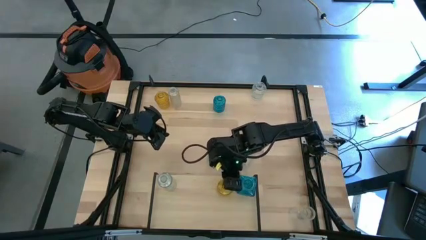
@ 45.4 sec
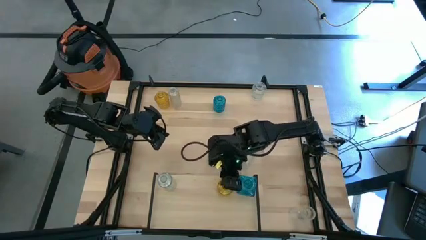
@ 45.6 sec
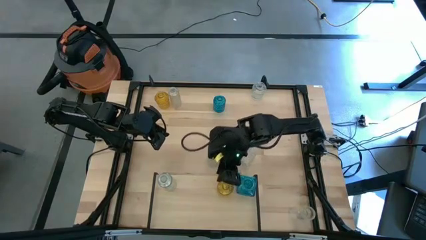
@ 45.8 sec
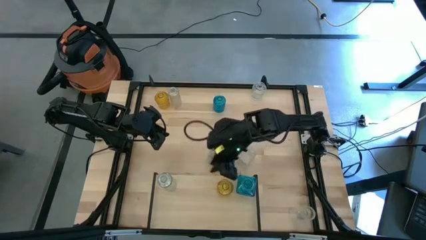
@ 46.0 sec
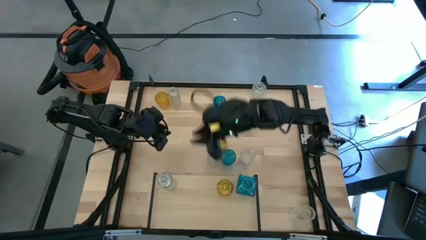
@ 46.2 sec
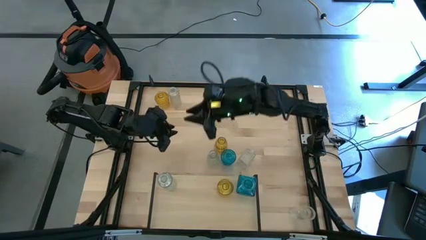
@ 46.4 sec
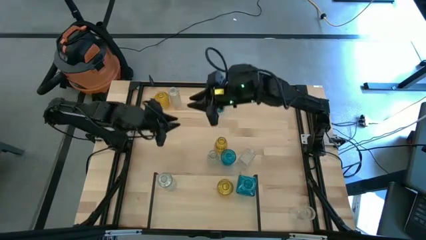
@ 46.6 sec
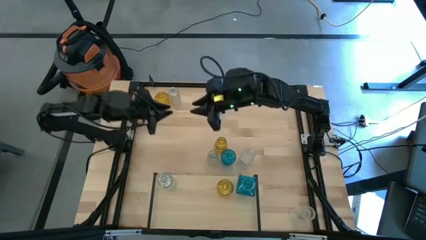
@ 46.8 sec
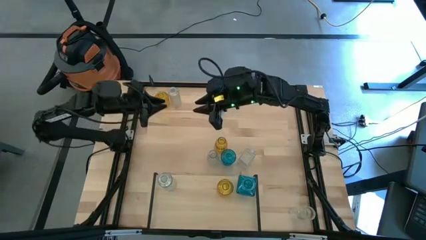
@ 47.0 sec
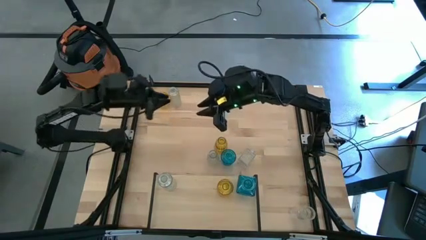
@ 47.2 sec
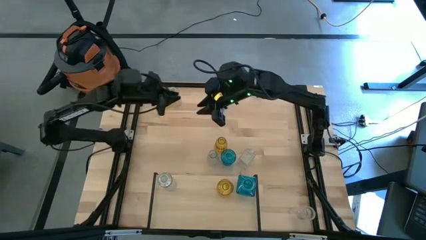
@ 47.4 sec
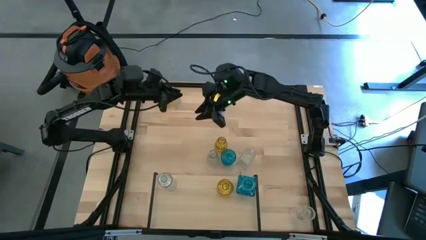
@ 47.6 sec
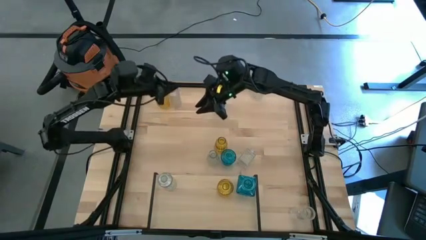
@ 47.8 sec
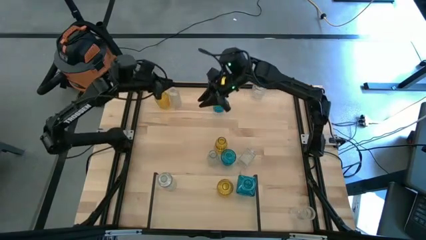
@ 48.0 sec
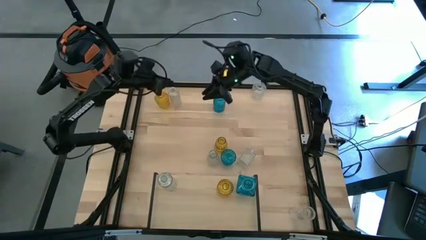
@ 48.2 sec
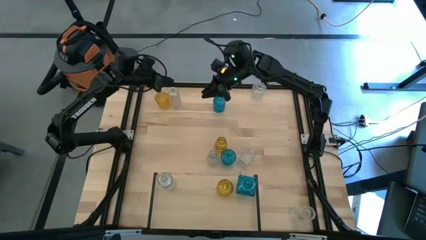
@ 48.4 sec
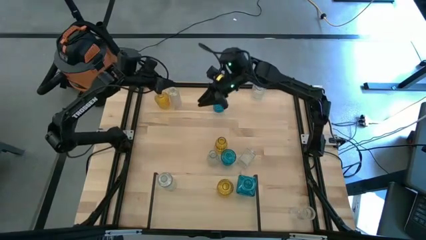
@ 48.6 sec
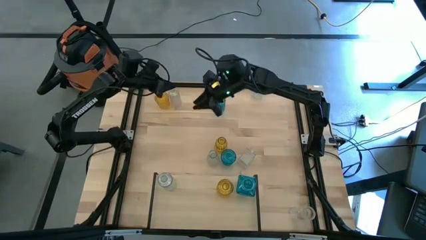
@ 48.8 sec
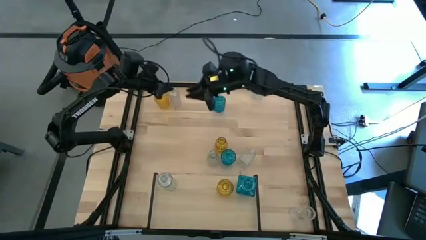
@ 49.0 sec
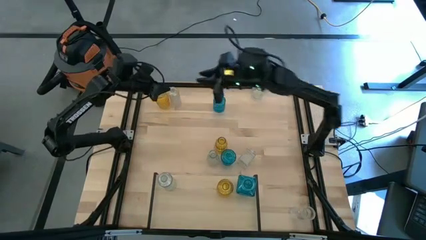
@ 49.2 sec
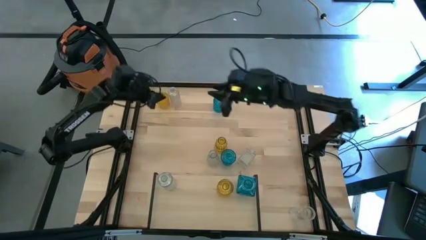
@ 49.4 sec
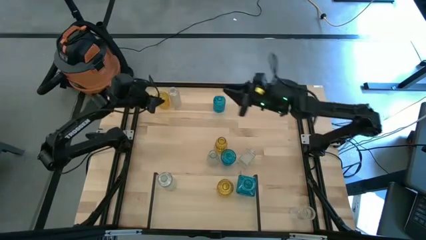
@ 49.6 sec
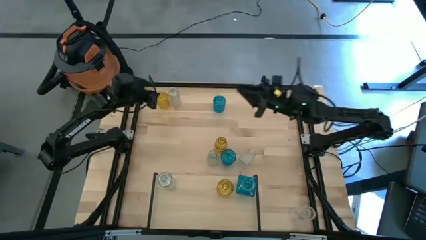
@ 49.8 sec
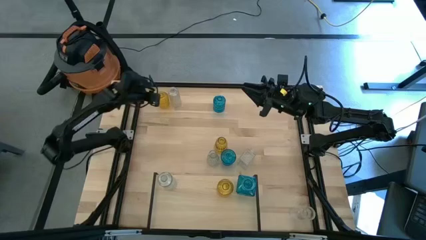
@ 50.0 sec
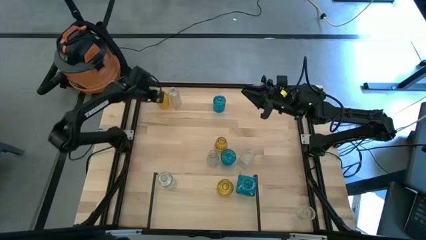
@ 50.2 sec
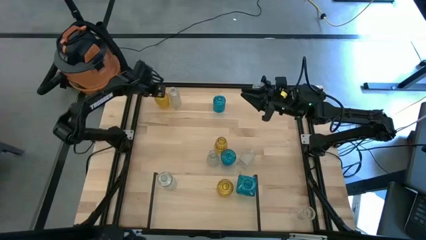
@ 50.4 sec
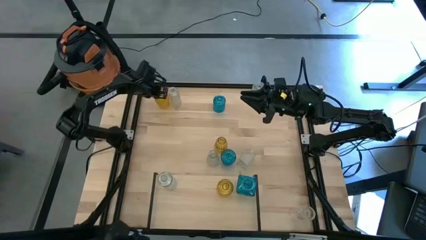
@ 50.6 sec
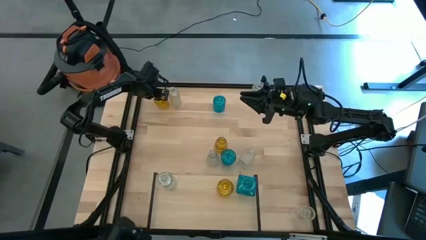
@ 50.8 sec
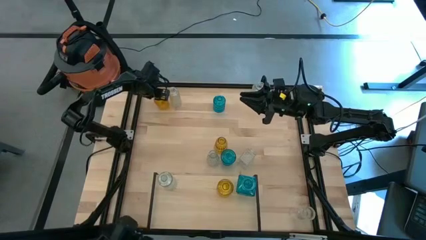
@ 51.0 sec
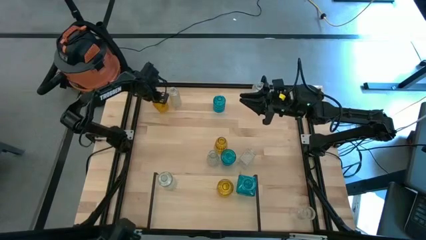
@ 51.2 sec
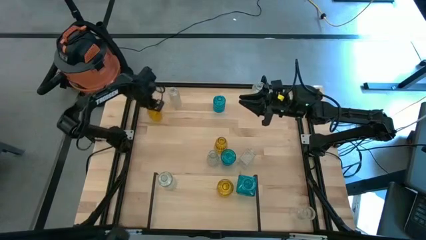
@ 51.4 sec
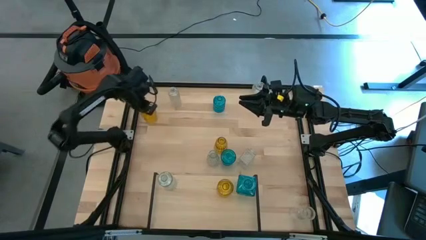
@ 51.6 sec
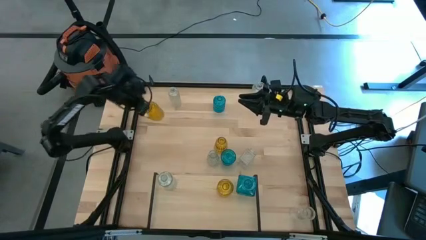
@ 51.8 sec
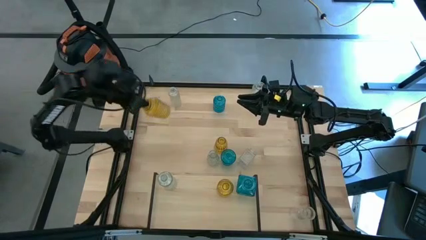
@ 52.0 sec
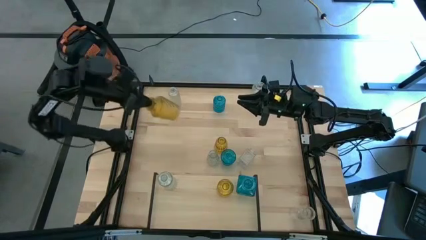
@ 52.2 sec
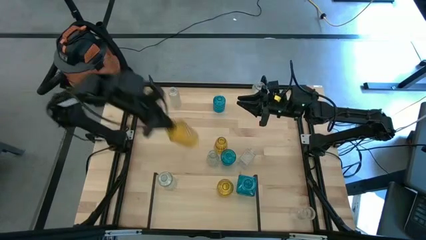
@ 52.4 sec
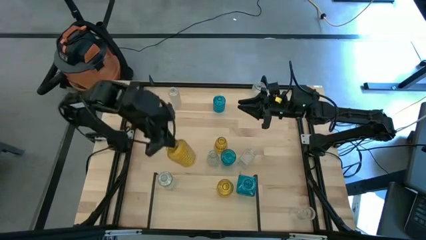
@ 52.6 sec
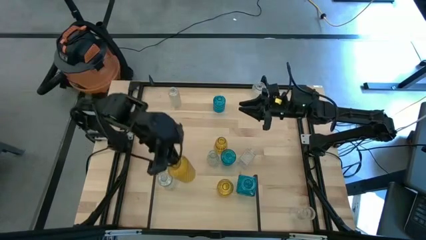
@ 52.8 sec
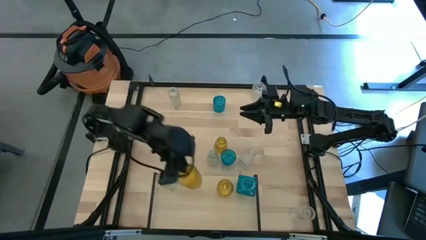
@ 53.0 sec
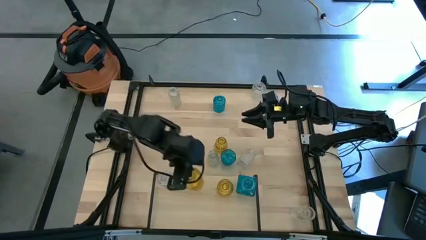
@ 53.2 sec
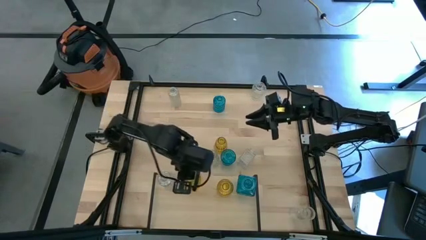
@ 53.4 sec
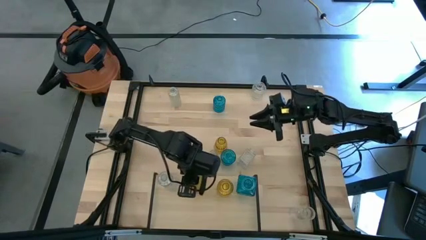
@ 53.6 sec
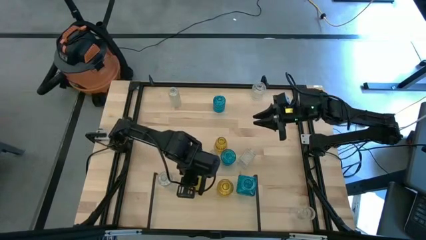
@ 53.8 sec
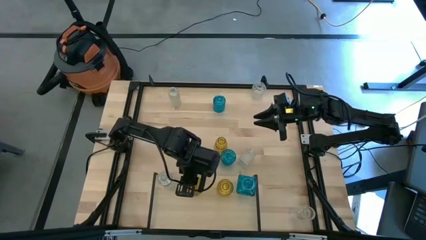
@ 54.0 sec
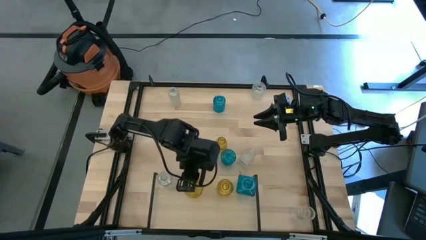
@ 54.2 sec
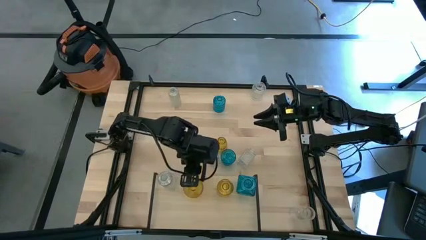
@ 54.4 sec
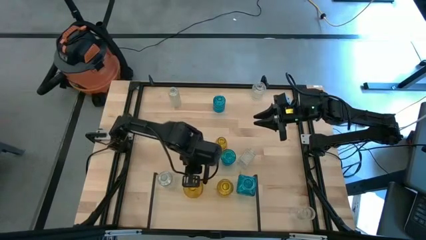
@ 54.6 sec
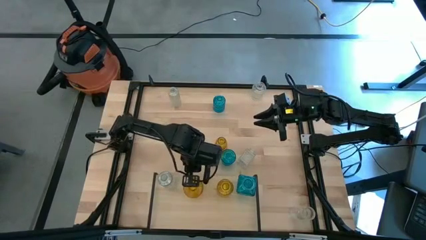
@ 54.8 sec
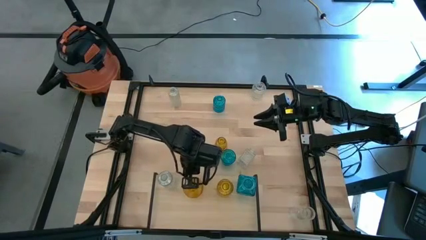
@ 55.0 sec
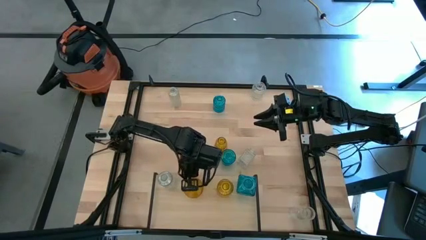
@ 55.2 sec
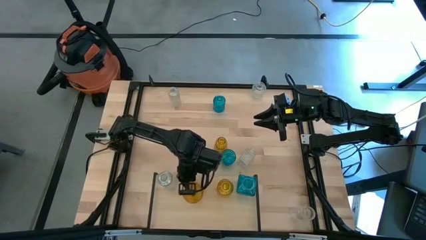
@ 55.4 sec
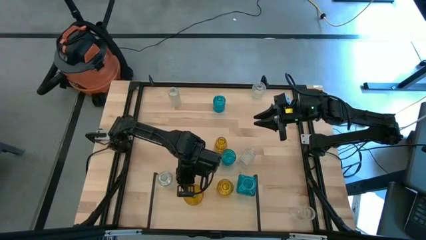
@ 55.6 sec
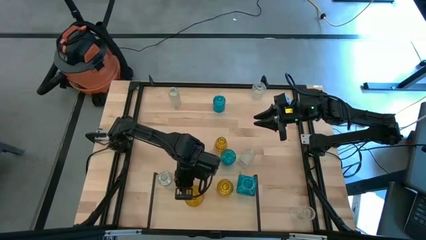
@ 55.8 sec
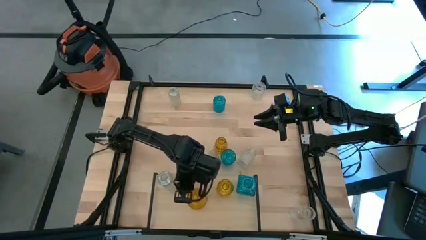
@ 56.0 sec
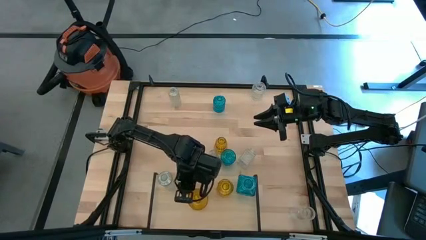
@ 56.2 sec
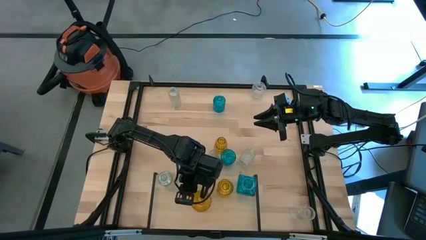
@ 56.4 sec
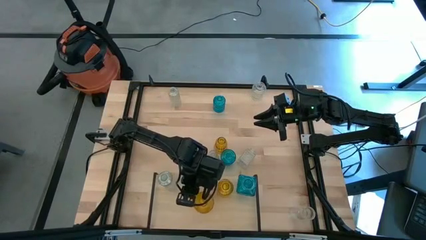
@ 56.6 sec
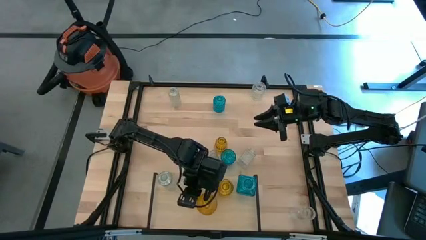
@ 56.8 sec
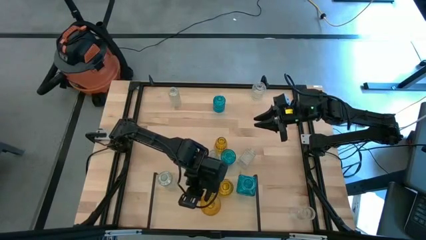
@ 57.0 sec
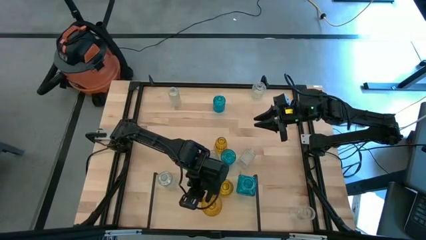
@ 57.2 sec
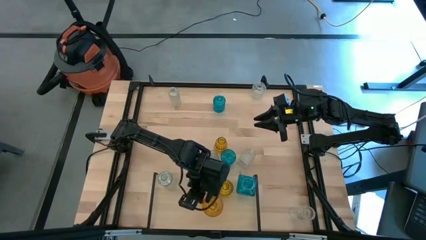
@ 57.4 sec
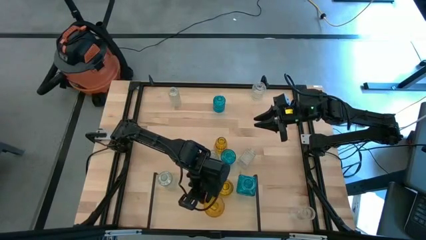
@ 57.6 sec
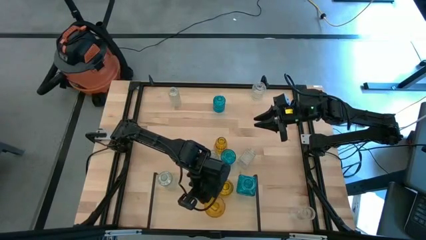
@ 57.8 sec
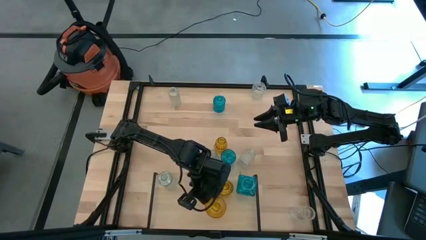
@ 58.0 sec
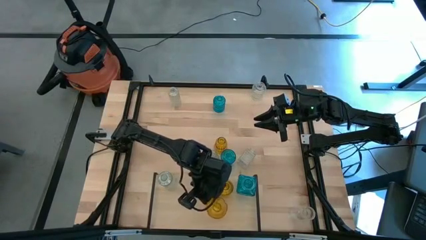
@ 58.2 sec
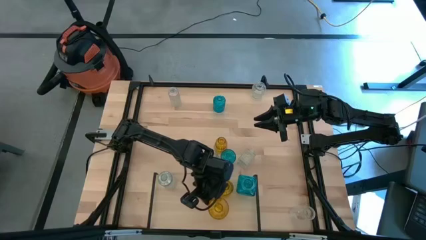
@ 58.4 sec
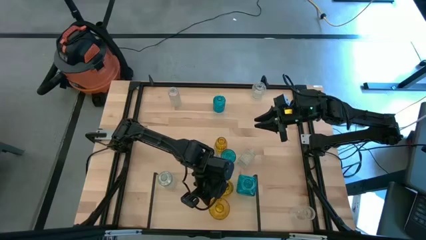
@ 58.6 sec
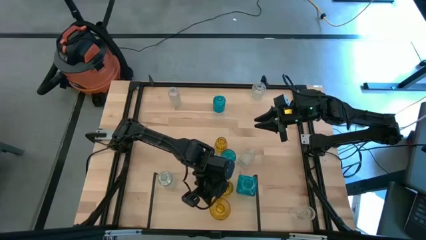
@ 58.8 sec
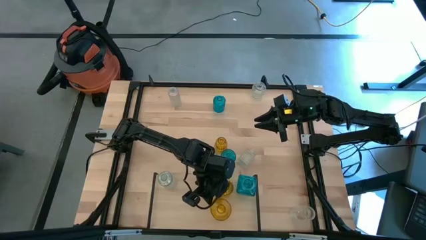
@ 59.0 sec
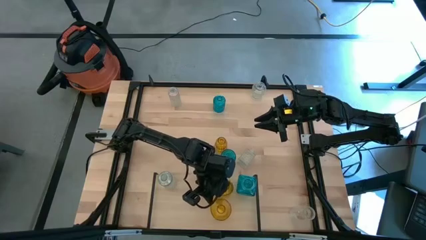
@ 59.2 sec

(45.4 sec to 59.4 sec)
Task: sort vases onto shelf
Put the yellow vase on the shelf aligned with the other yellow vase

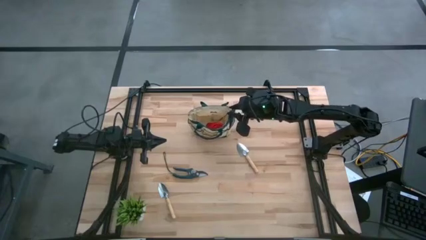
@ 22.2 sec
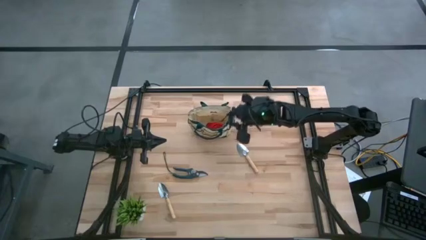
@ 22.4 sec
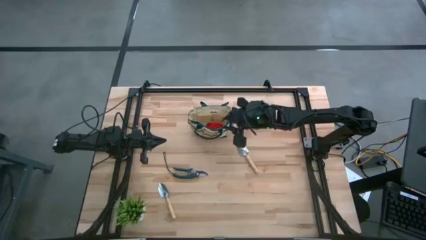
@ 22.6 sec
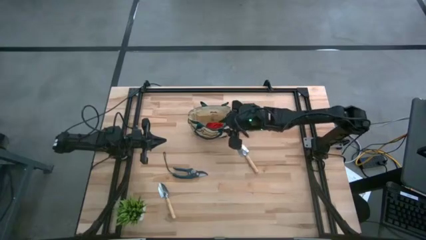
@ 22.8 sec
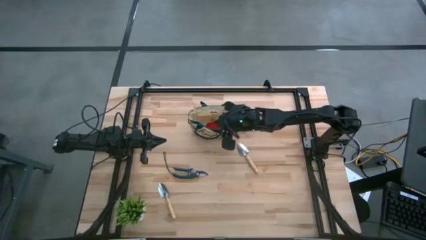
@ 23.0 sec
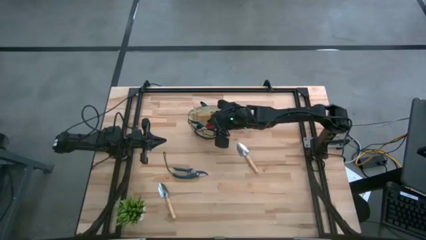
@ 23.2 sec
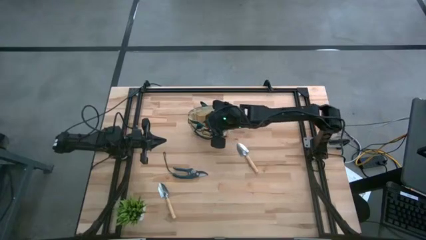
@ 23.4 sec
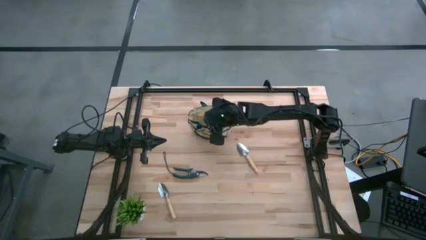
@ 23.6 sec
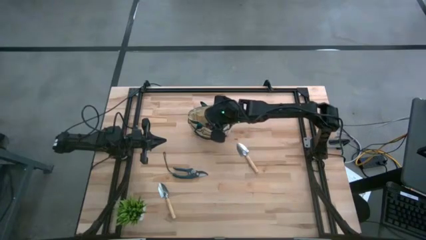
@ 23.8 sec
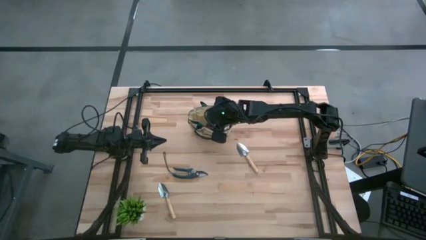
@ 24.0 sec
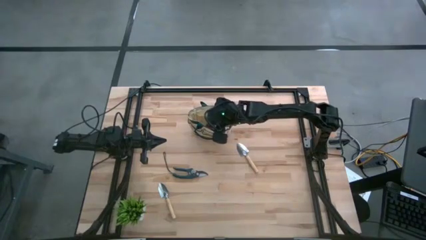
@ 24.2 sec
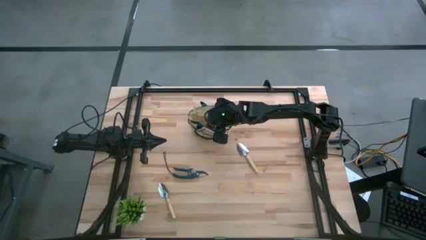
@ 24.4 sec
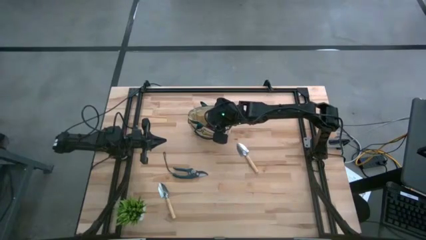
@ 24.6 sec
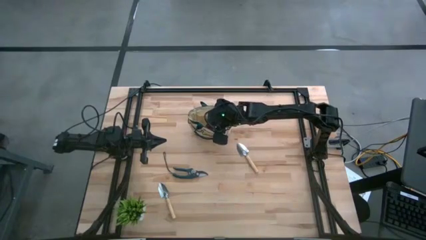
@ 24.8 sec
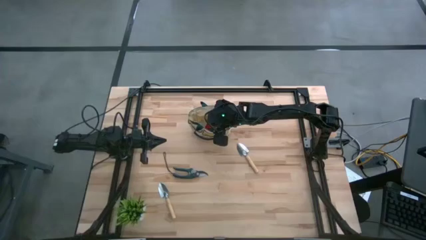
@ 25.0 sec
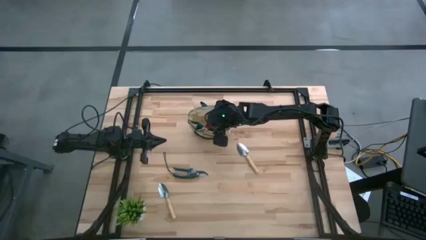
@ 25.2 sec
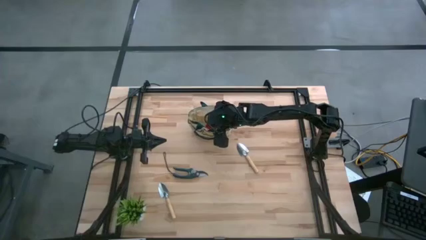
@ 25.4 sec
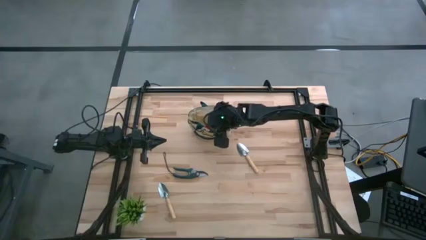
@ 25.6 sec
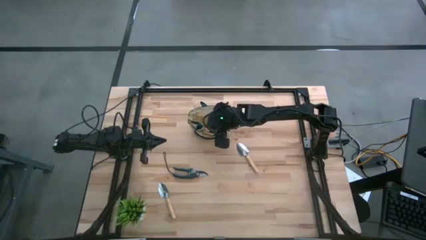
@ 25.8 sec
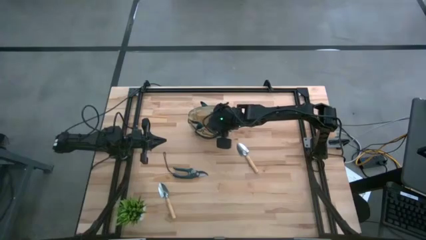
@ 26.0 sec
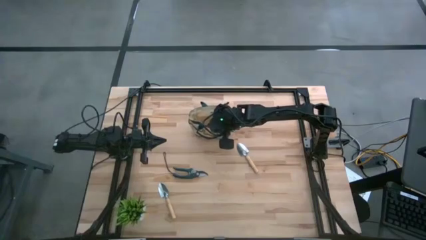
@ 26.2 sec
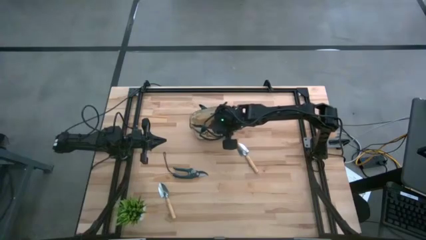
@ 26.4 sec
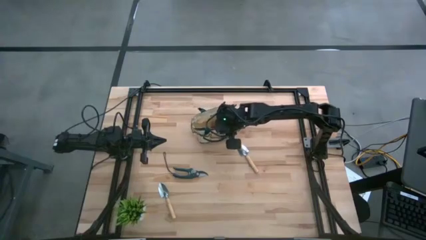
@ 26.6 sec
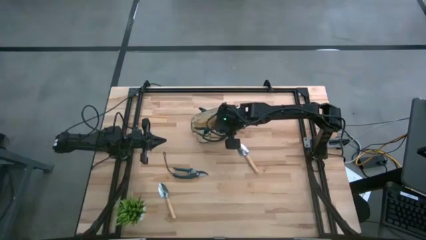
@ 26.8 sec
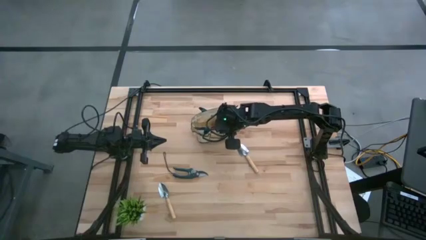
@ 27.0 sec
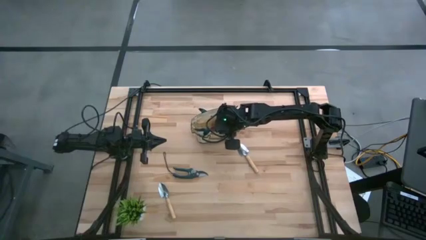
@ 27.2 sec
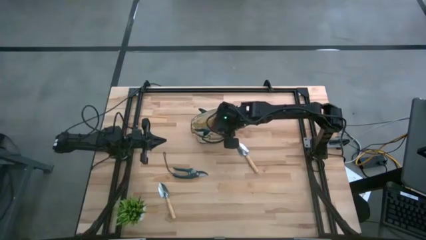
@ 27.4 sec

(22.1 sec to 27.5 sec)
Task: Pick & Place Garden tools in Gardening bag
Adjust the brown gardening bag
